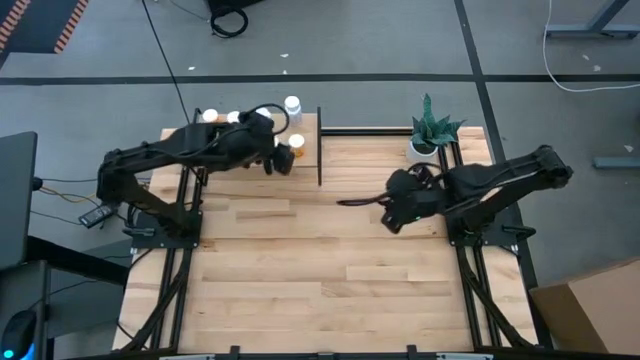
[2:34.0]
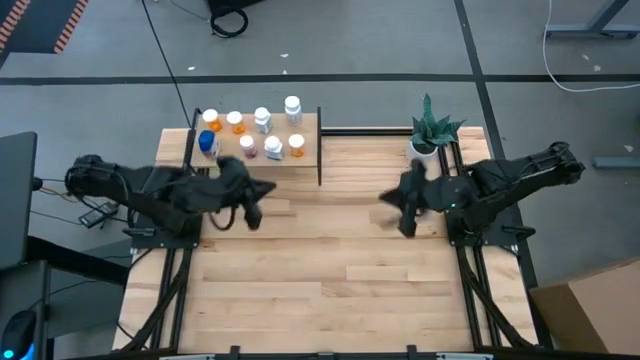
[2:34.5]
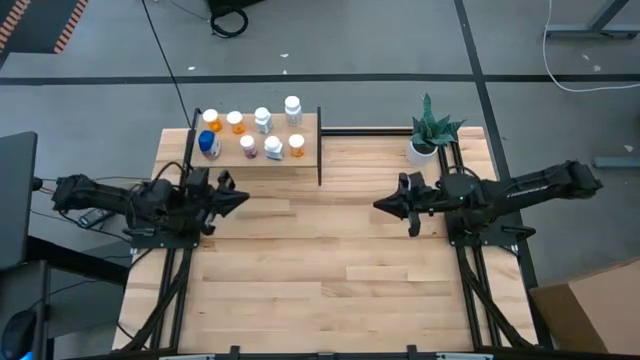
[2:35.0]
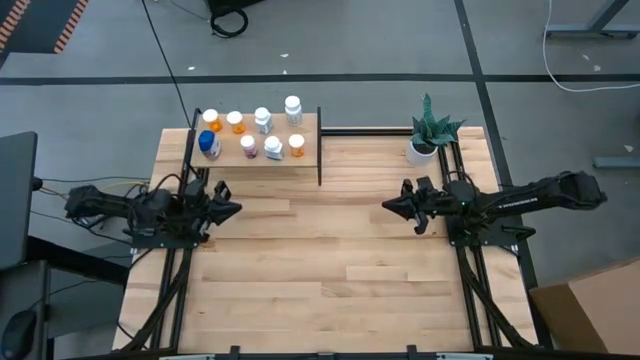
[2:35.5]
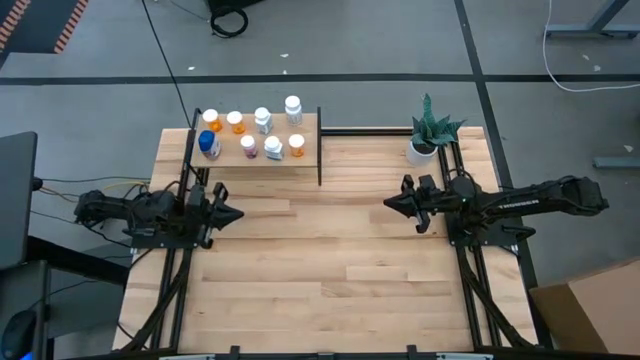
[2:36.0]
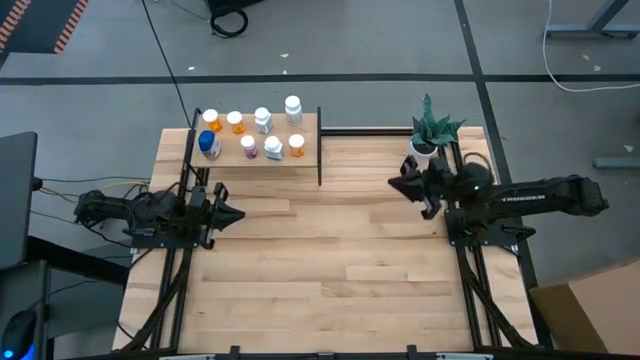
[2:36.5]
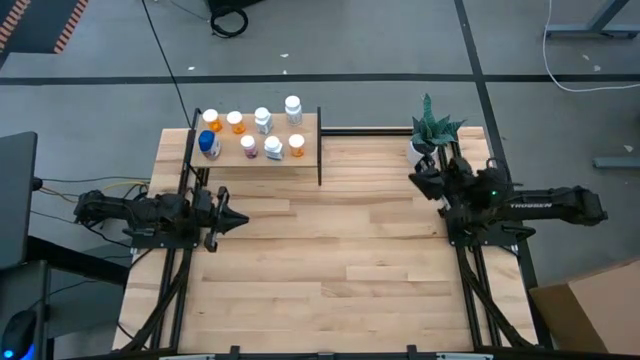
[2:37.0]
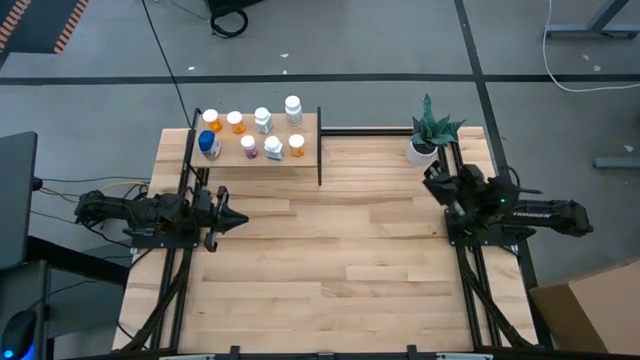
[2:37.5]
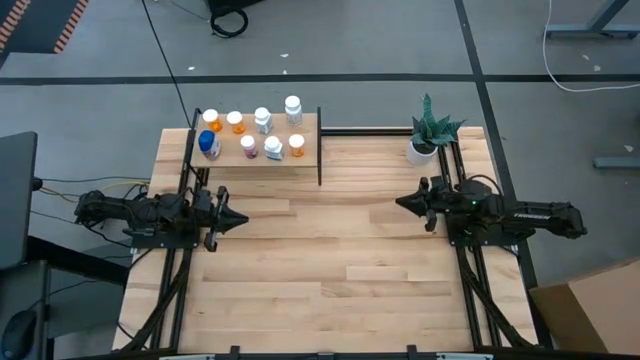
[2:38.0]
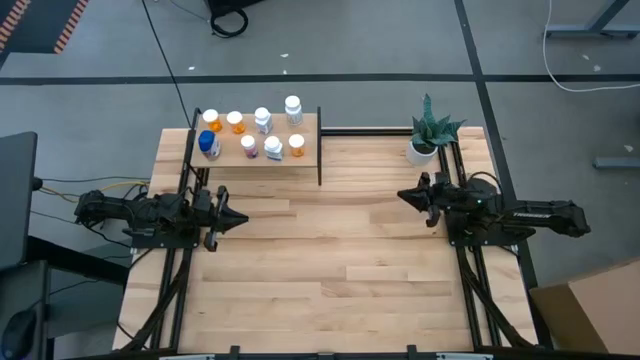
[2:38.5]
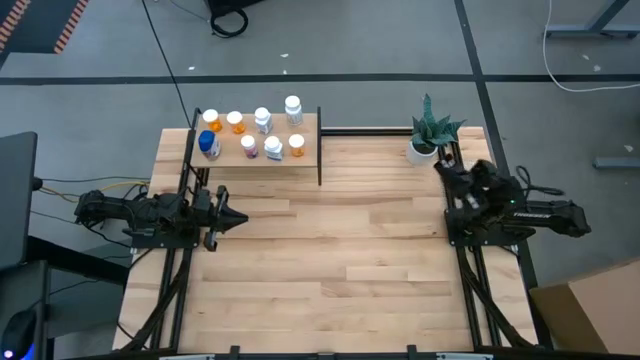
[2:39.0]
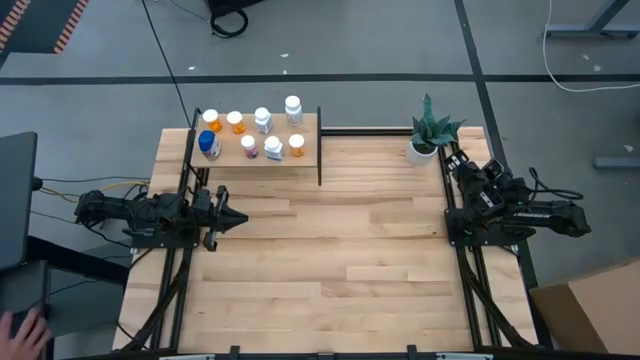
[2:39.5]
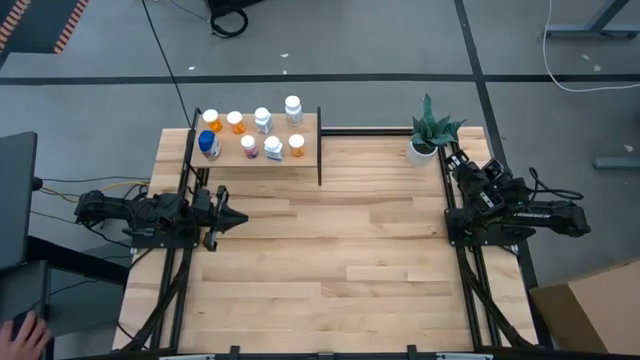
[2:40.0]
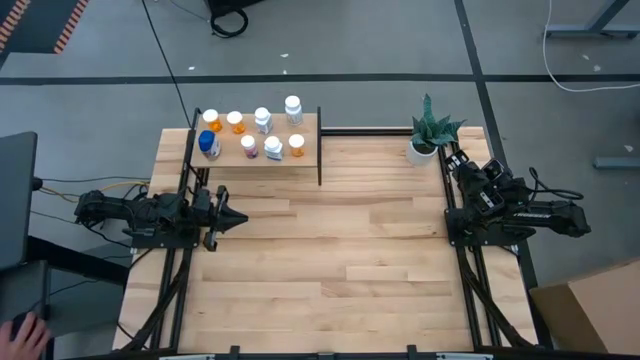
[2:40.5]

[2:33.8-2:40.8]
Task: Pick and place medicine bottles onto shelf by color
Return to Home Position

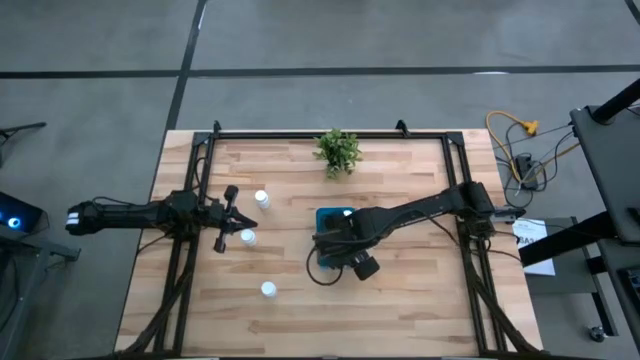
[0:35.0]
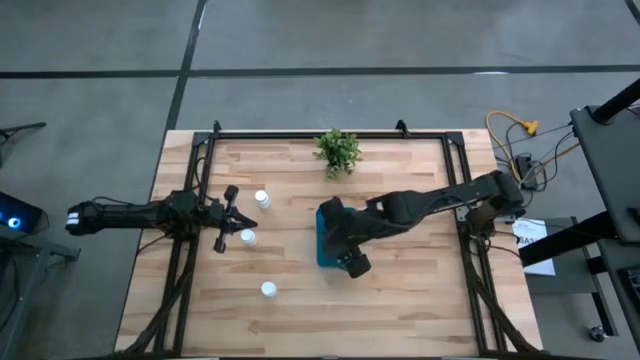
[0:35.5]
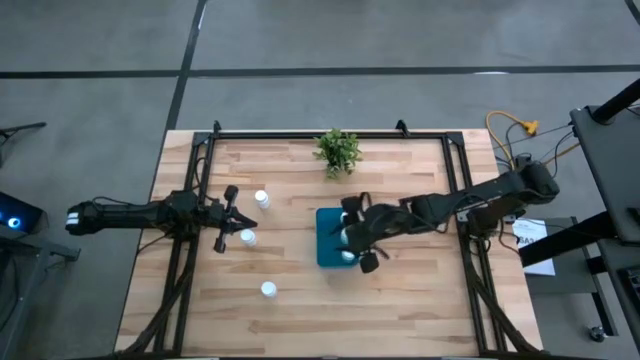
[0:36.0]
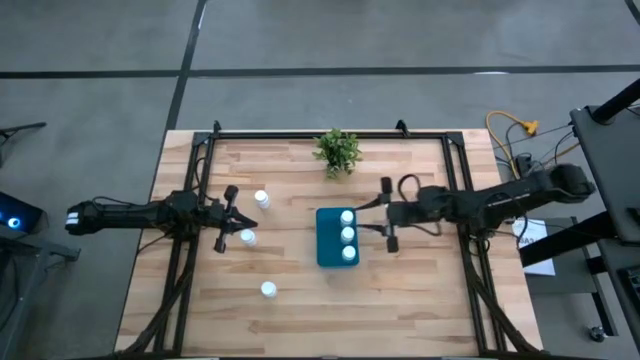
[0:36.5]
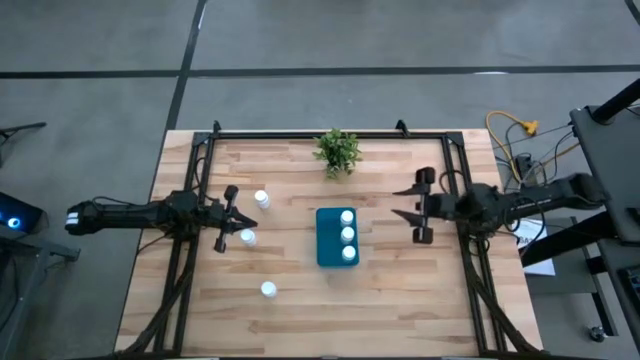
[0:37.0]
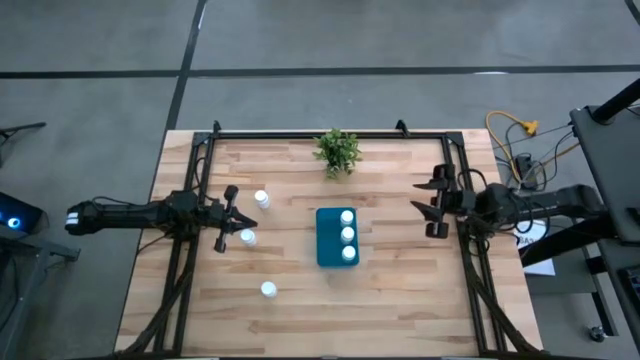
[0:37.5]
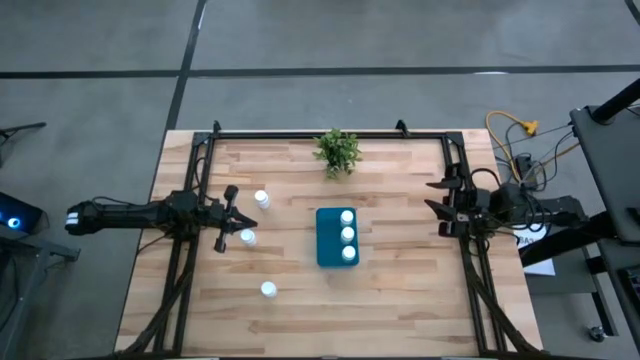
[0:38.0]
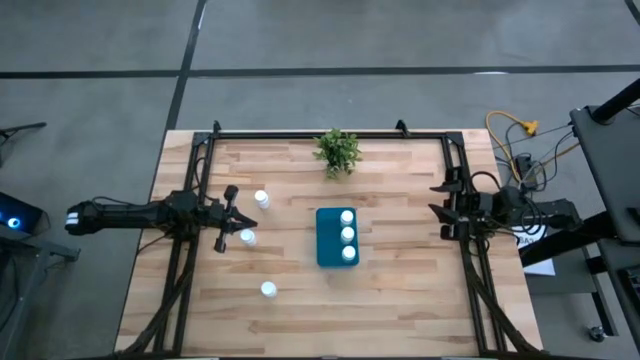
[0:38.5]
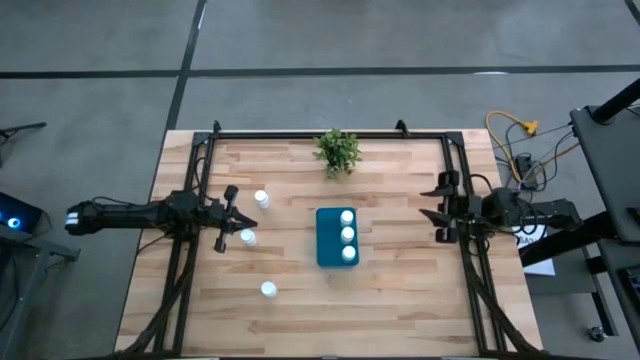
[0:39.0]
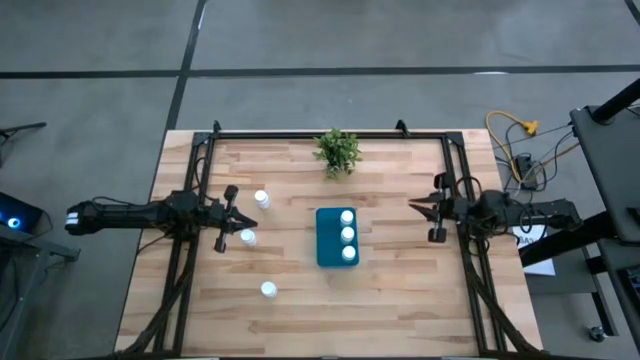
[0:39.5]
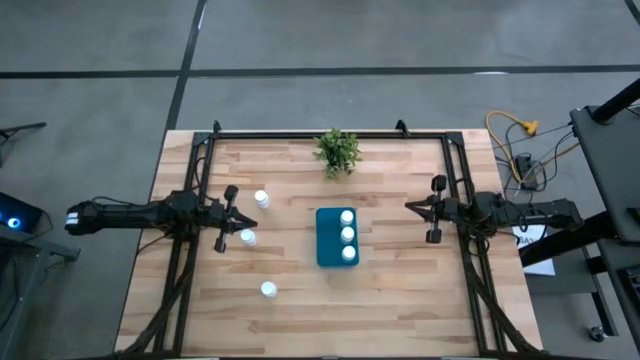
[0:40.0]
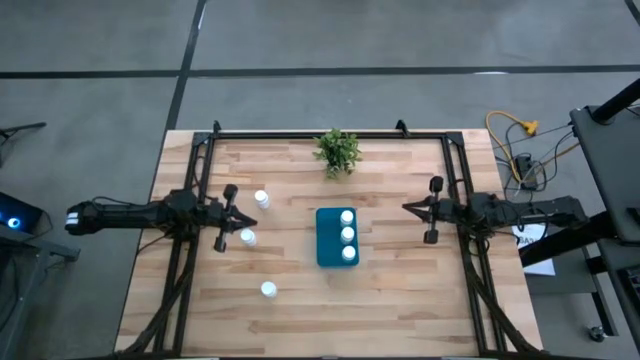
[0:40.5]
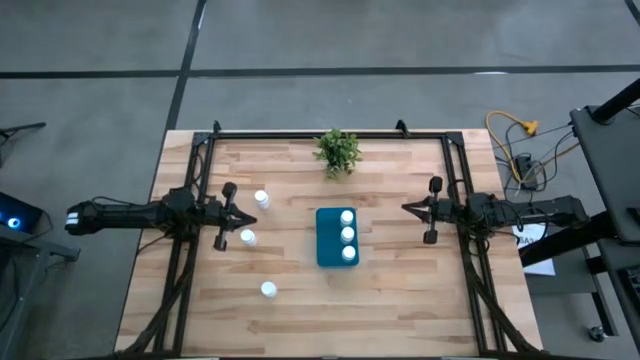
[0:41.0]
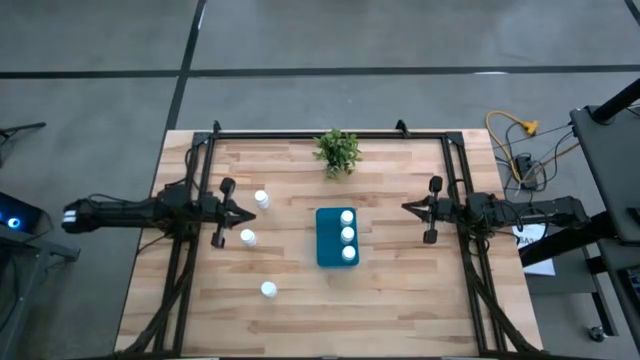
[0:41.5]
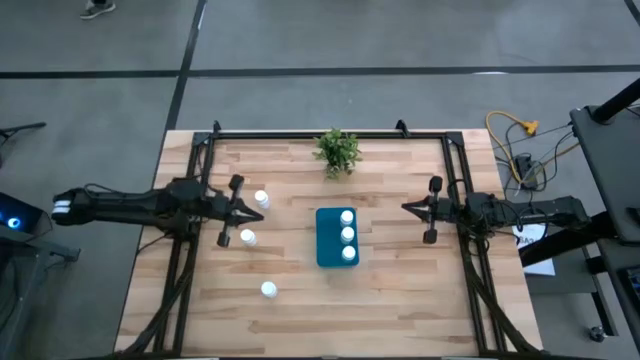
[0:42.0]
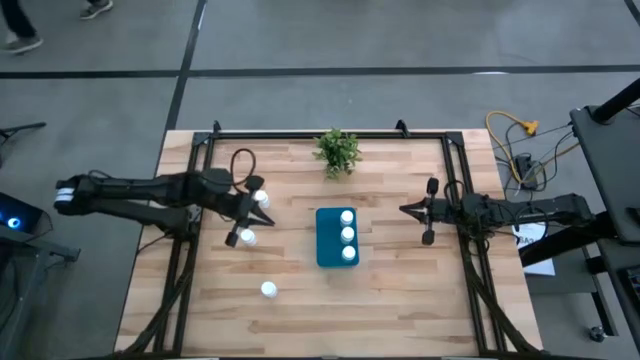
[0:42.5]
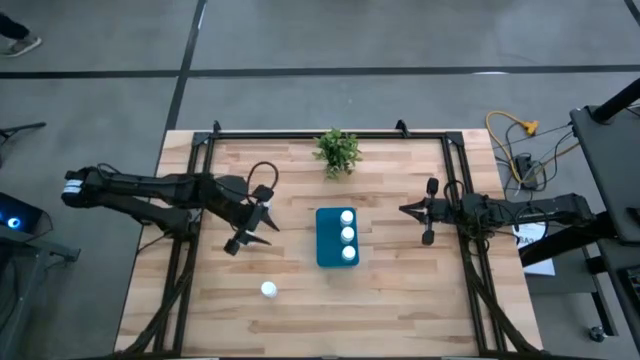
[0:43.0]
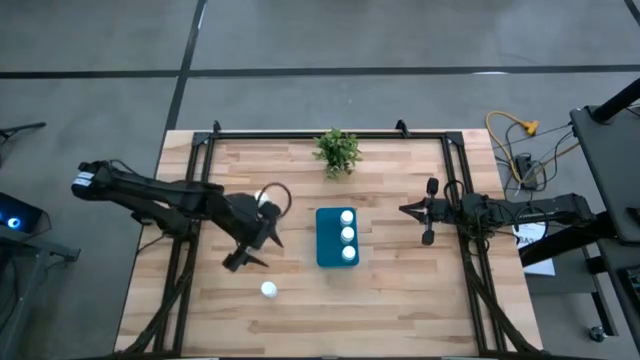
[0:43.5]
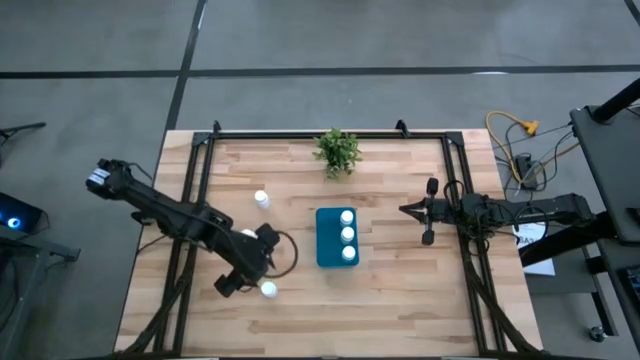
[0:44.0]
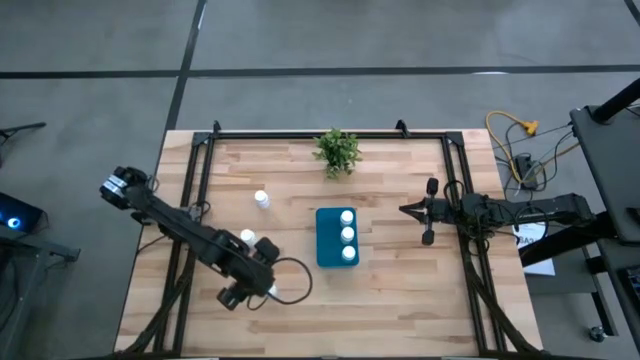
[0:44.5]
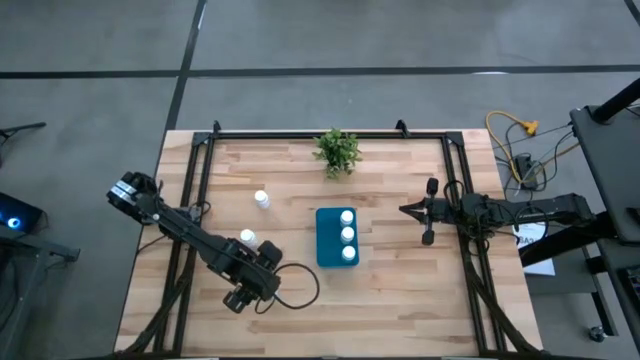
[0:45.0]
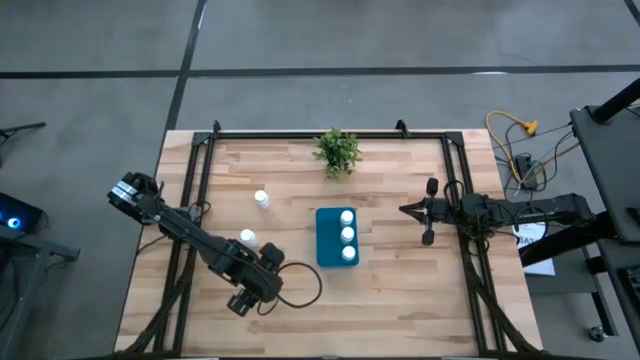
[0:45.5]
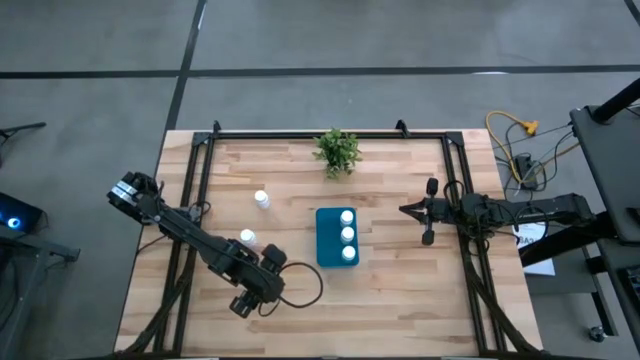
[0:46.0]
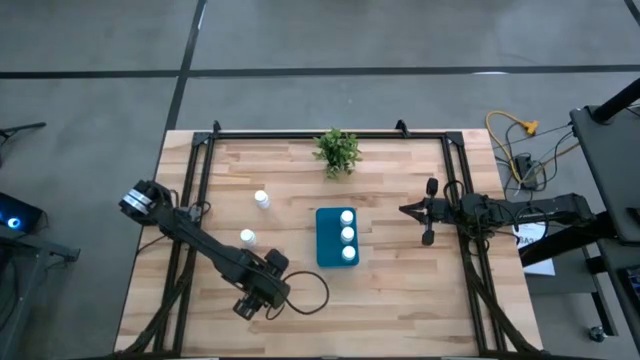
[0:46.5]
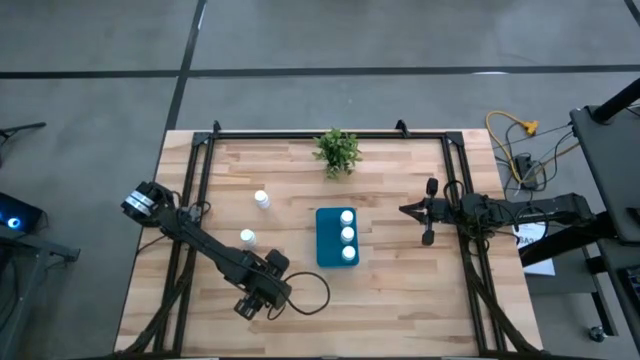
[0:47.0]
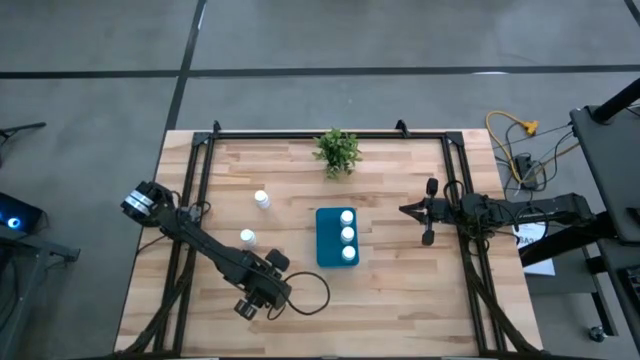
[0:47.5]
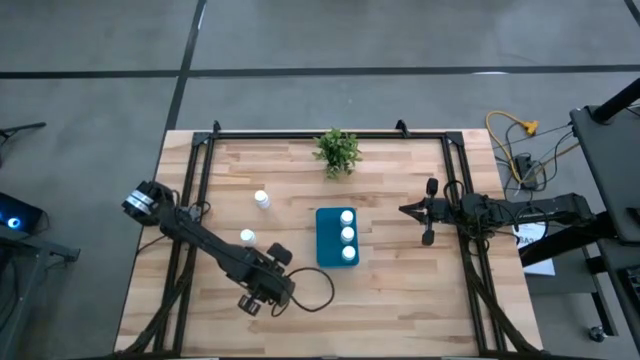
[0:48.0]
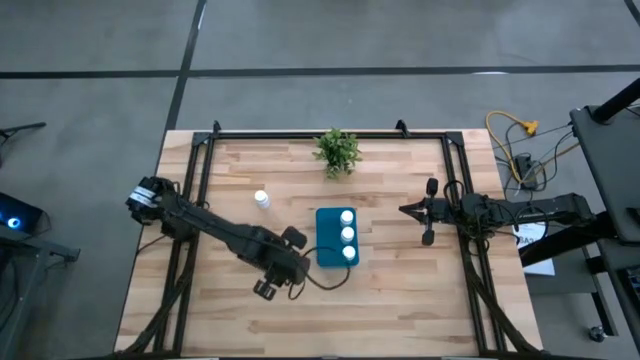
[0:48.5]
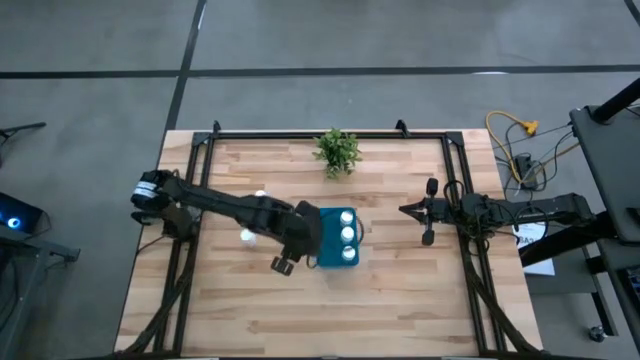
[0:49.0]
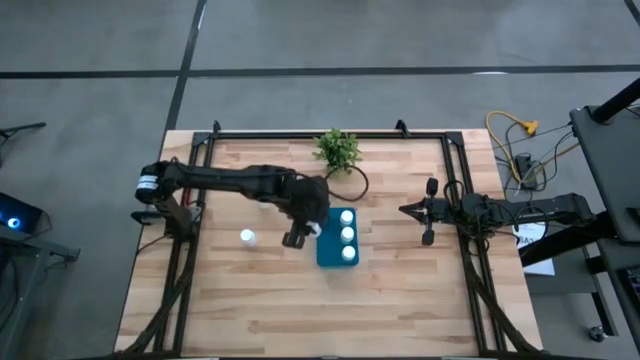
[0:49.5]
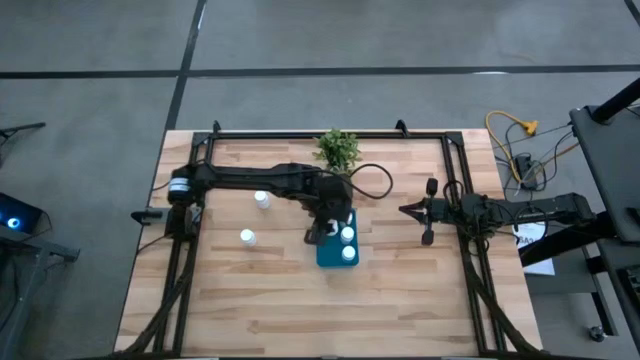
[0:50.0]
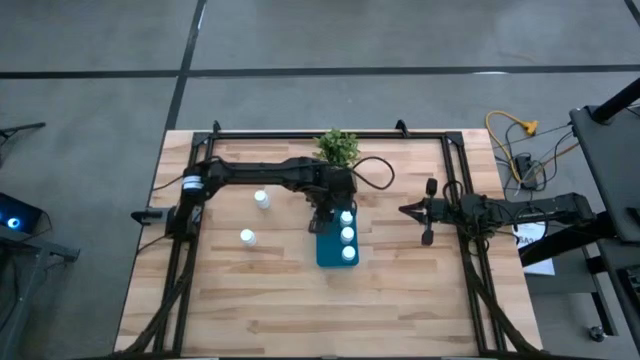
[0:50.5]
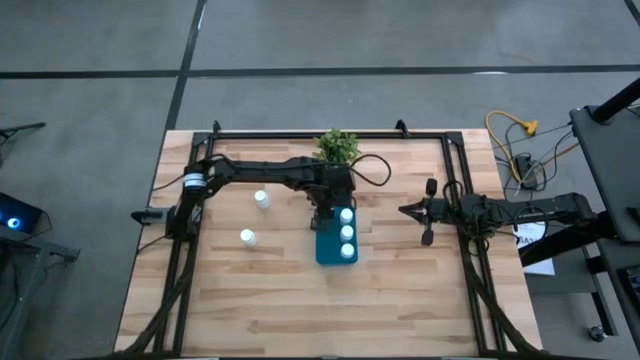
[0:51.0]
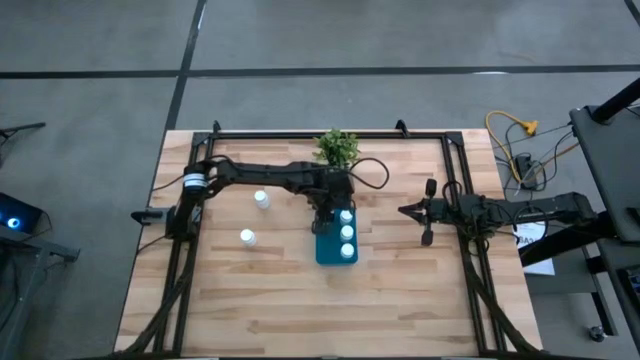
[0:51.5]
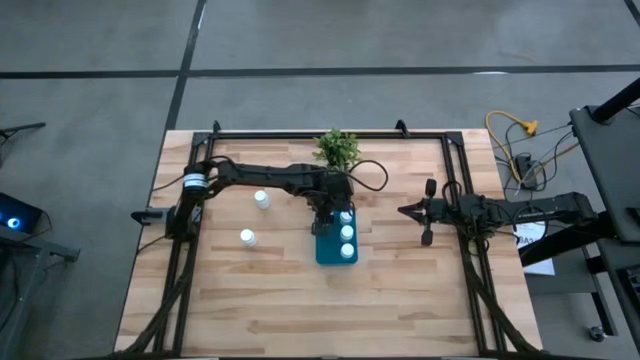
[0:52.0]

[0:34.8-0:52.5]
Task: Pick and place pill bottles into a basket
Put the white medicine bottle into the blue bin
